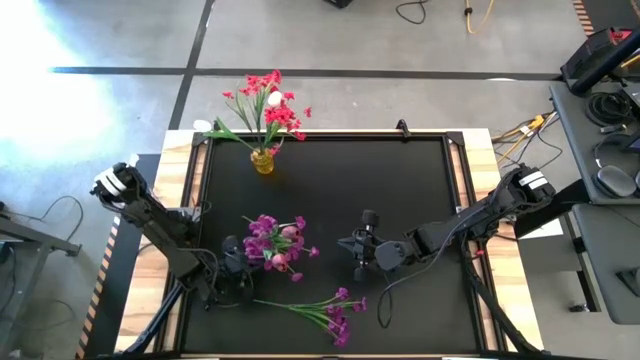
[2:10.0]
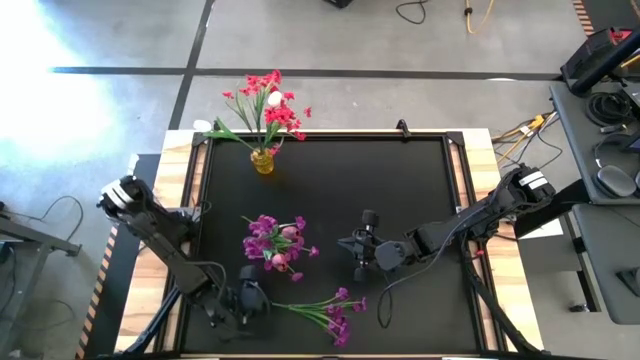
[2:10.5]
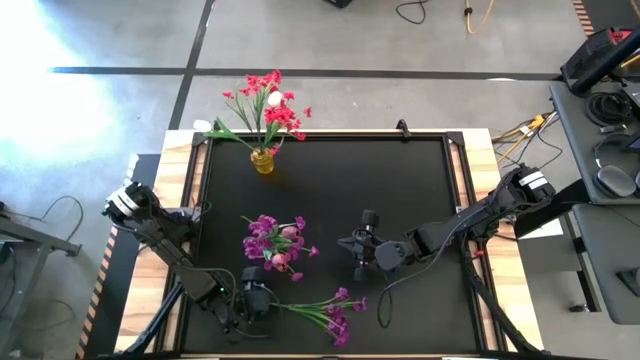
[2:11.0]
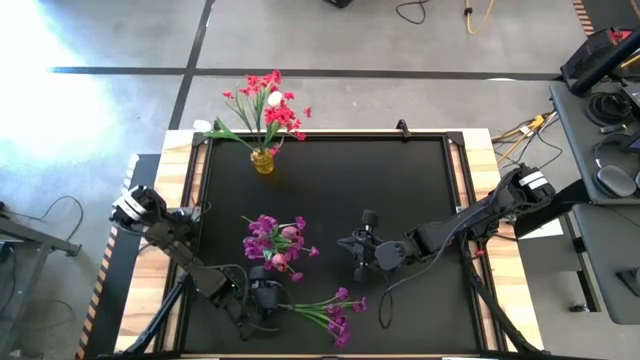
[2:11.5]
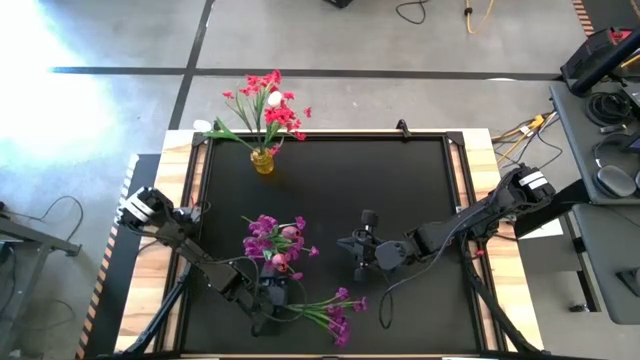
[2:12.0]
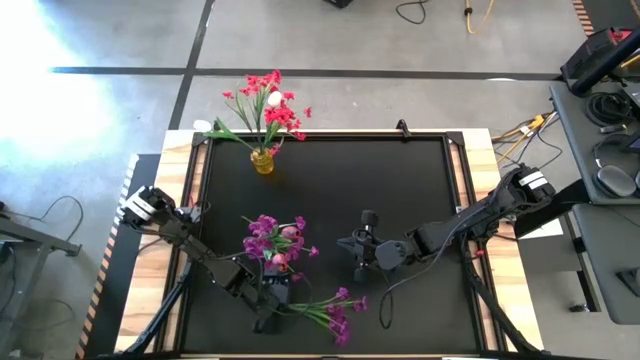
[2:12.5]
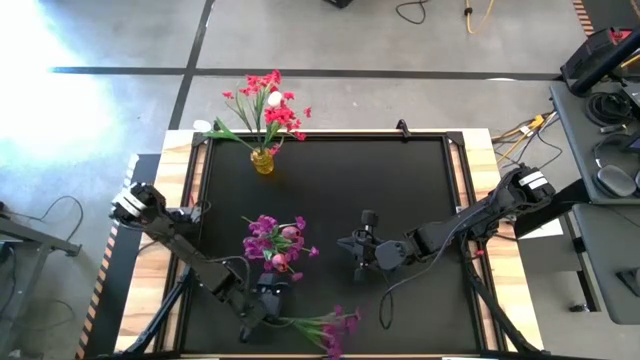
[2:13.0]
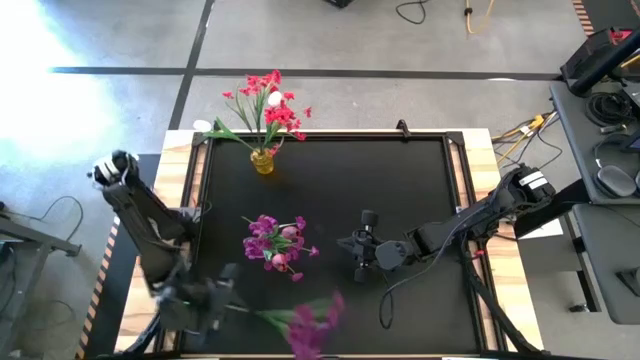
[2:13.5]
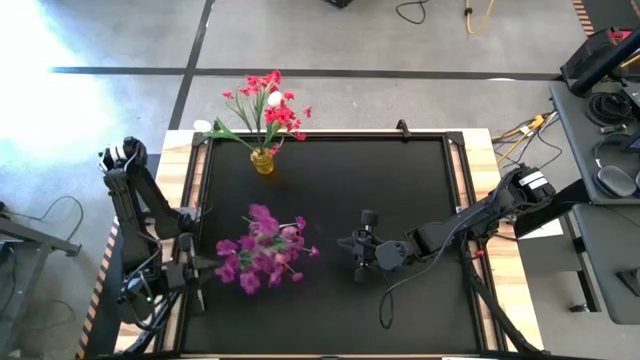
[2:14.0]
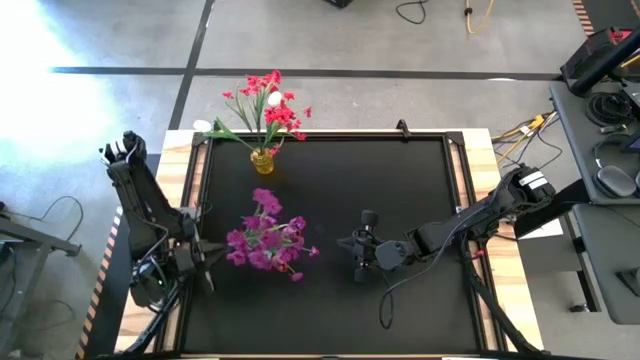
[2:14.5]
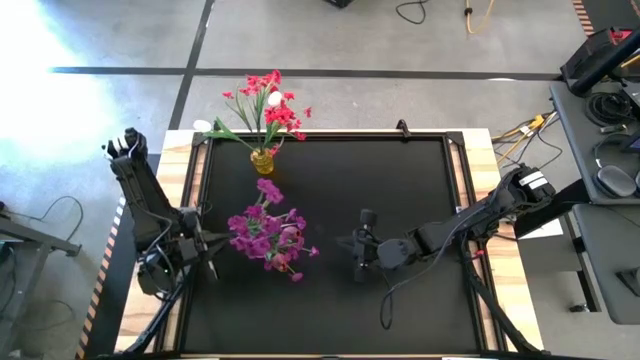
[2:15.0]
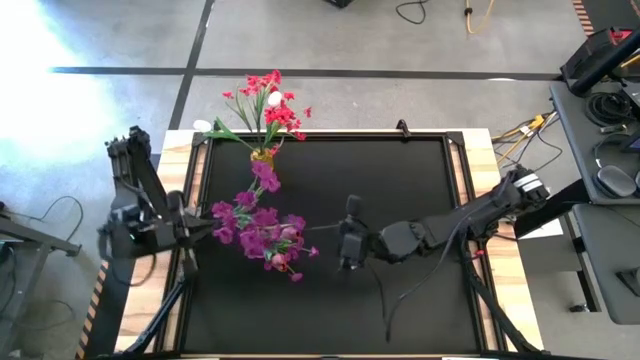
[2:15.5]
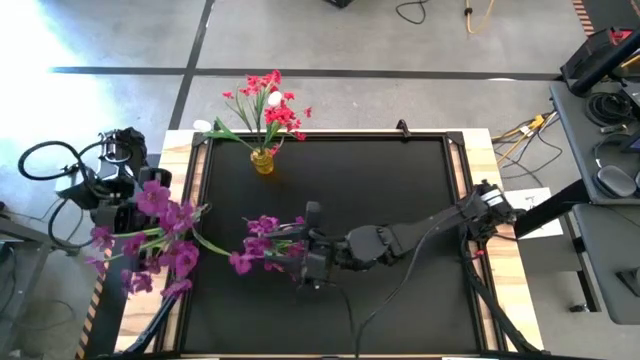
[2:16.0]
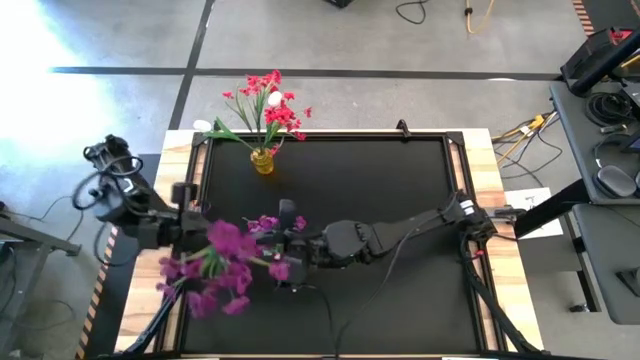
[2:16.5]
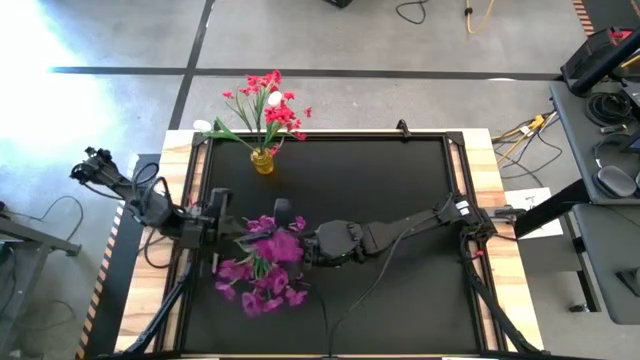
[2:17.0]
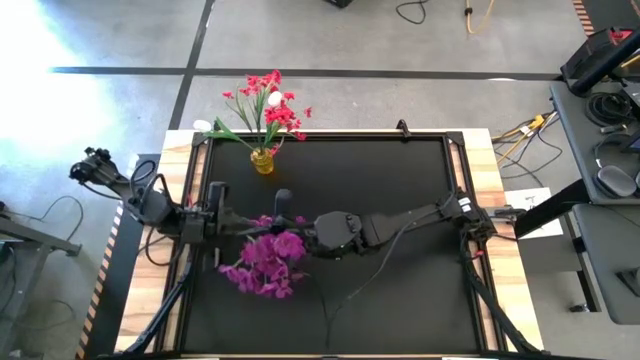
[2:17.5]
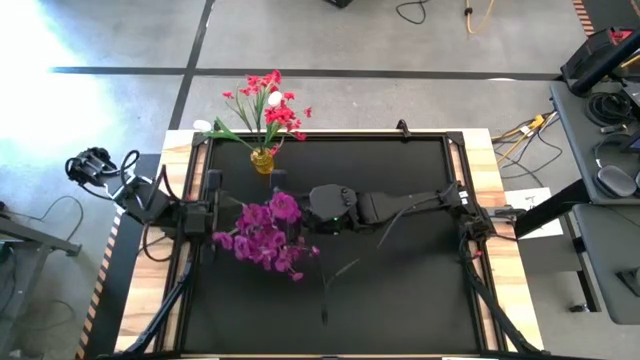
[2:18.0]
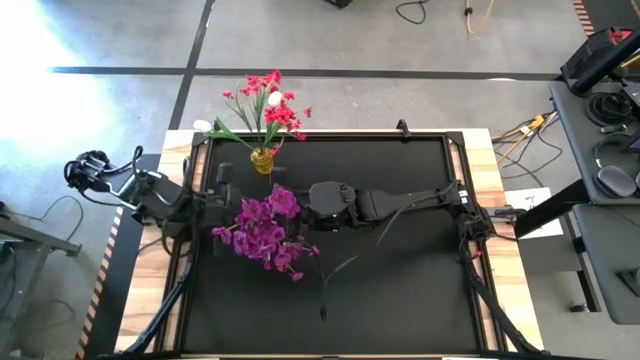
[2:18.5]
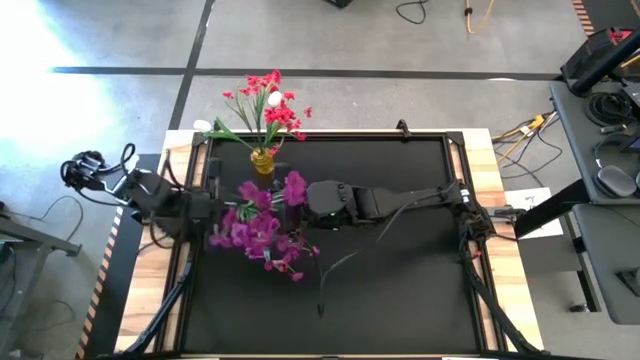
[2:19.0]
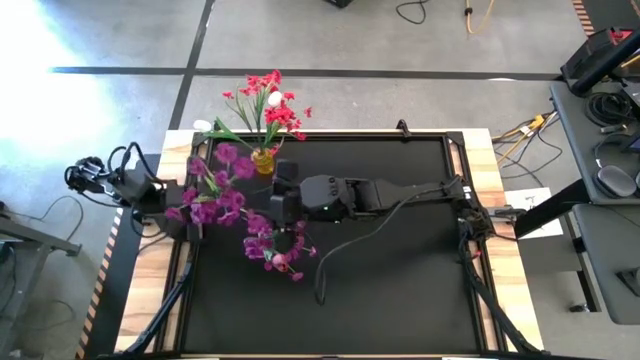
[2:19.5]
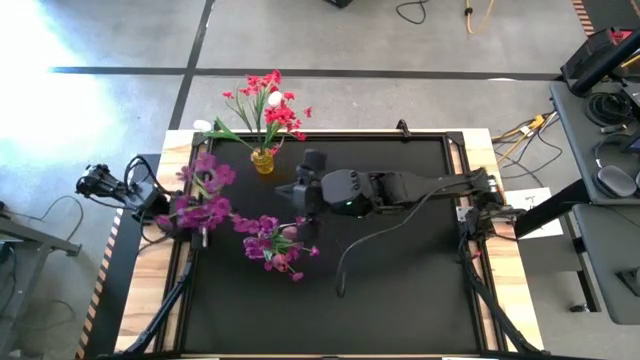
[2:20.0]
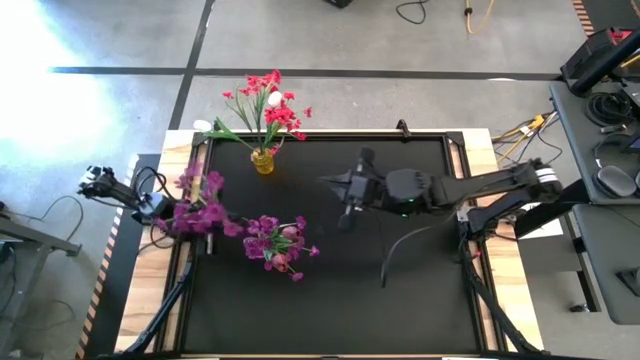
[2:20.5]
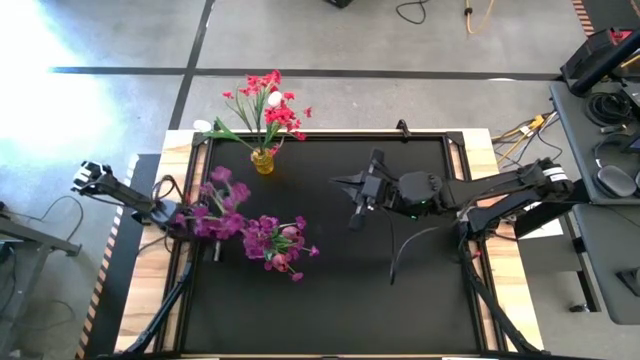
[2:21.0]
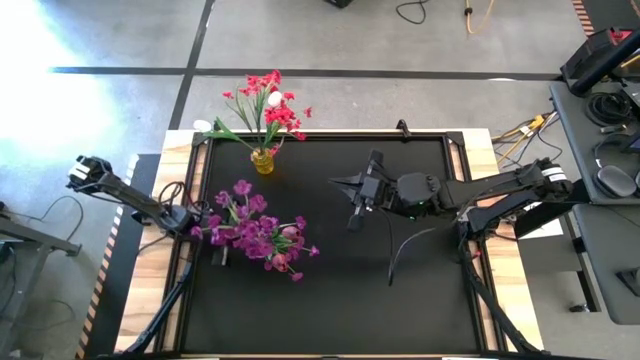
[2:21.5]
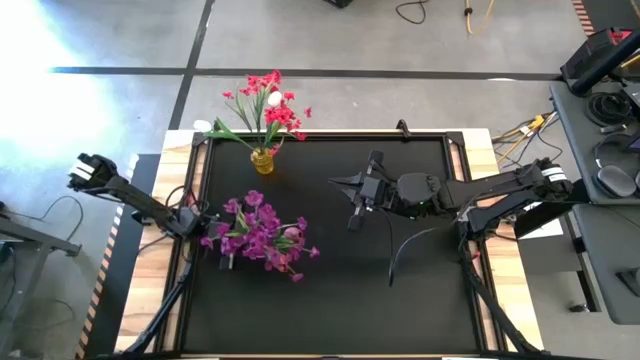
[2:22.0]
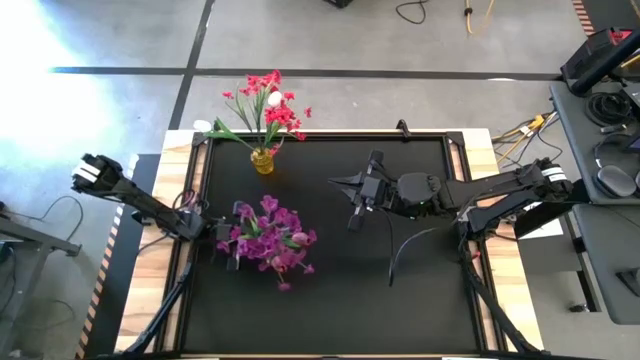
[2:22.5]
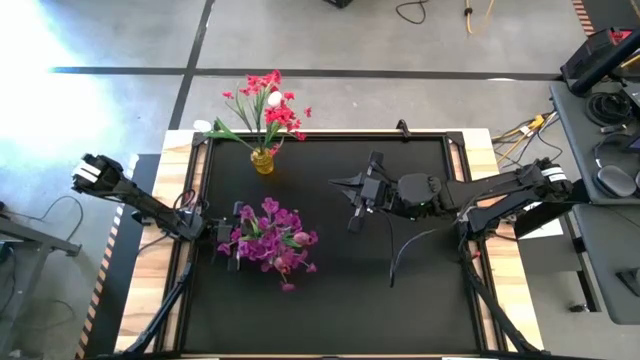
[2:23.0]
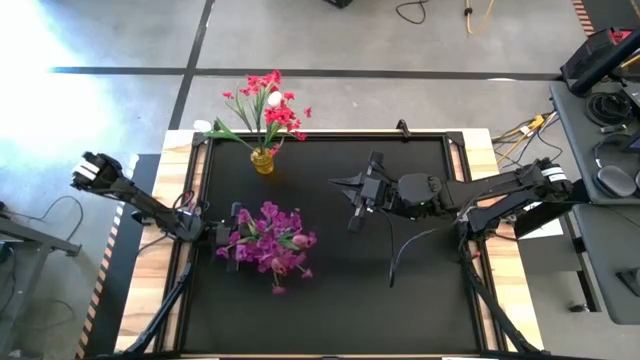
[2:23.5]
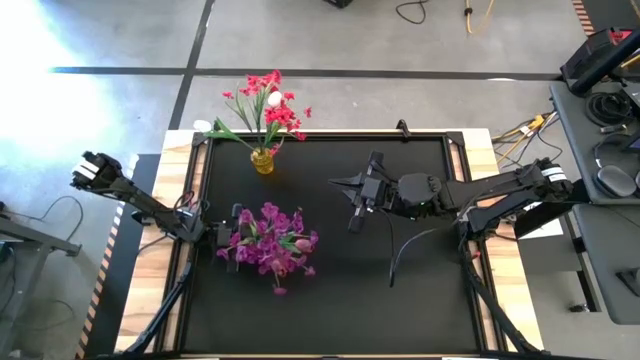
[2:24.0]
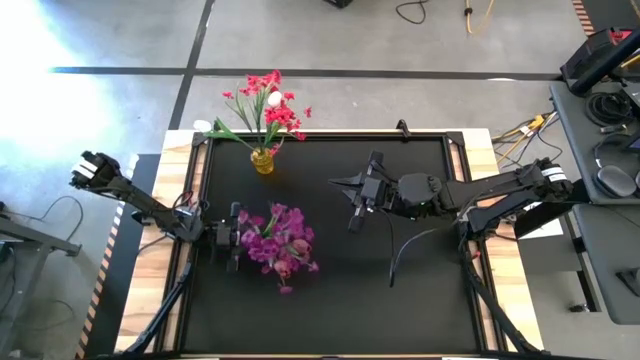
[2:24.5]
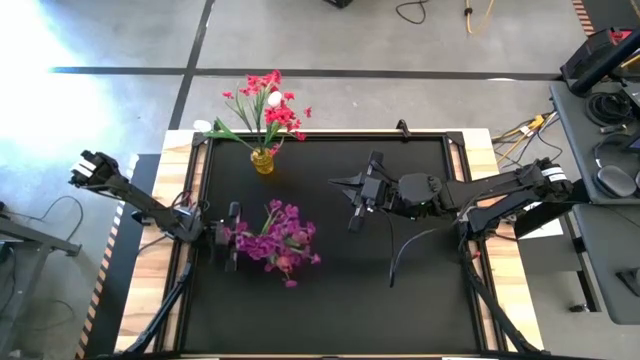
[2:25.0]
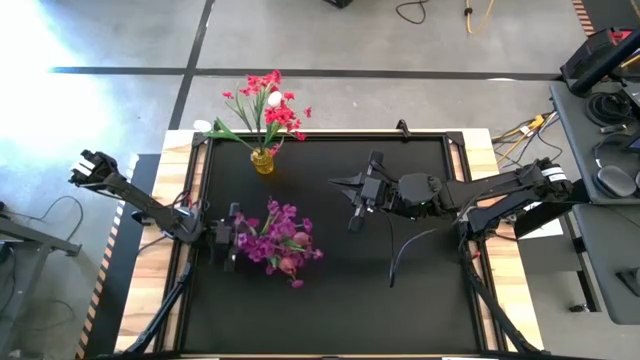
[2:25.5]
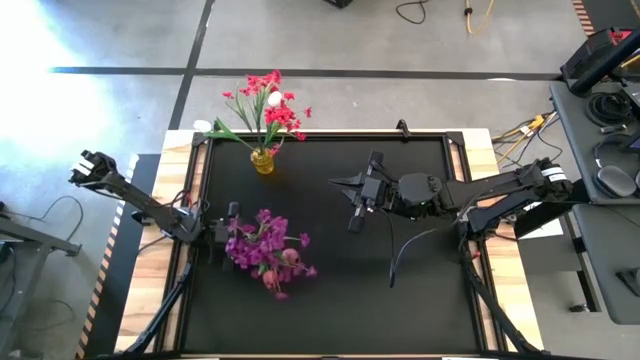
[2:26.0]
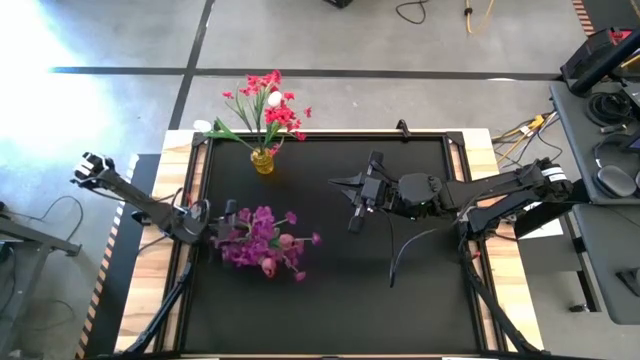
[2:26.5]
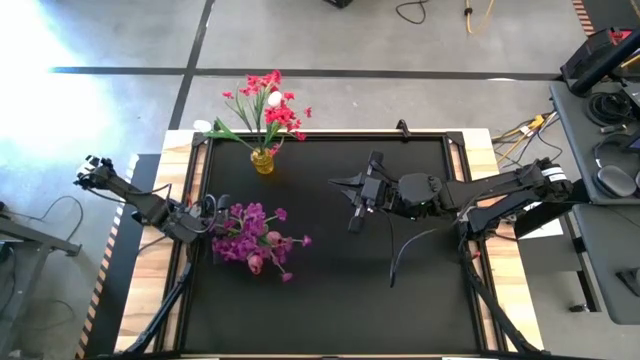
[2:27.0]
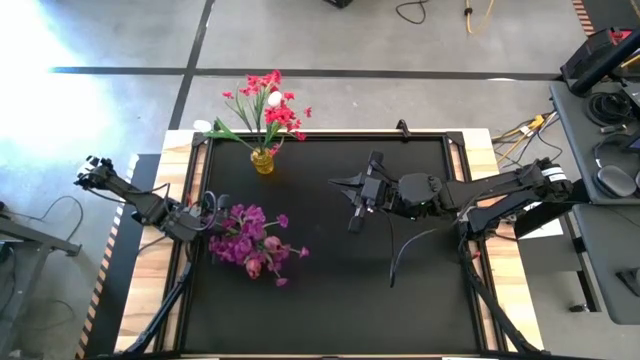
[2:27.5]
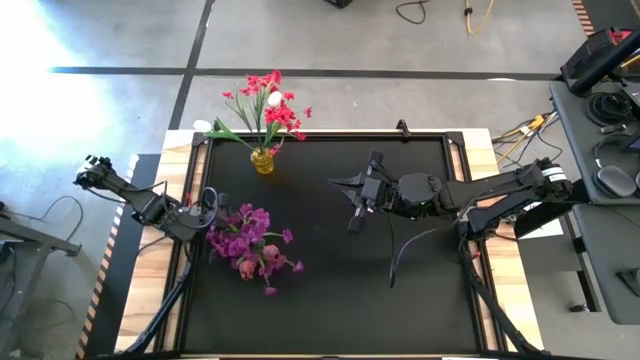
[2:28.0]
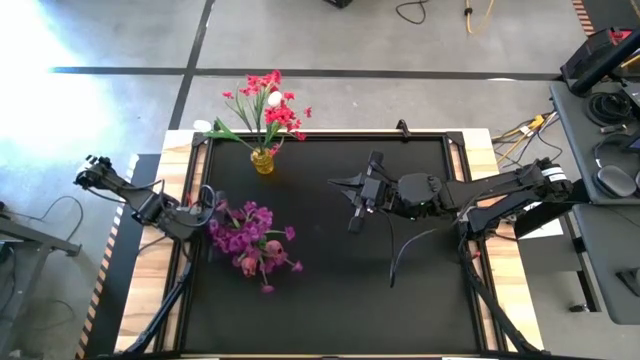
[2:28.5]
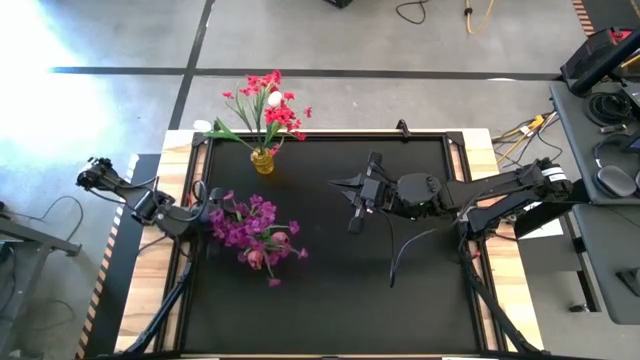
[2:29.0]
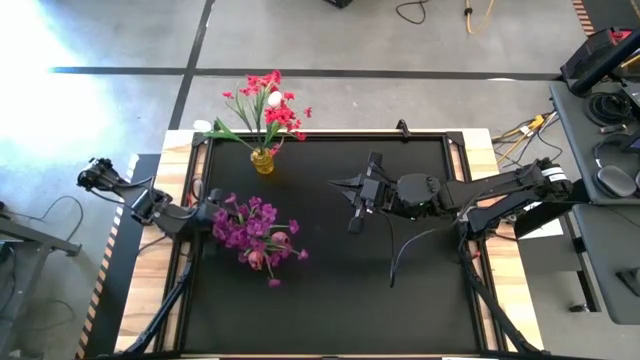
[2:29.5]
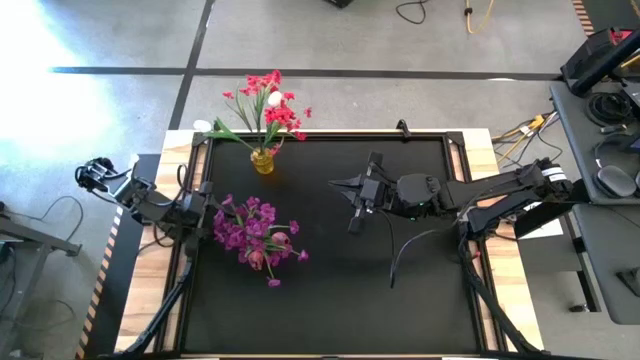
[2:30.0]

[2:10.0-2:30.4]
Task: Sort flowers into vase by color
Put the violet flowers into the violet vase
